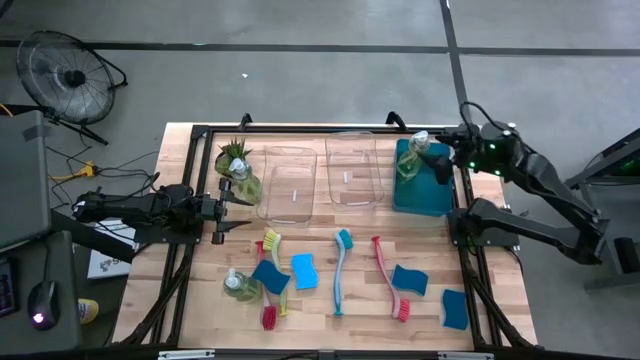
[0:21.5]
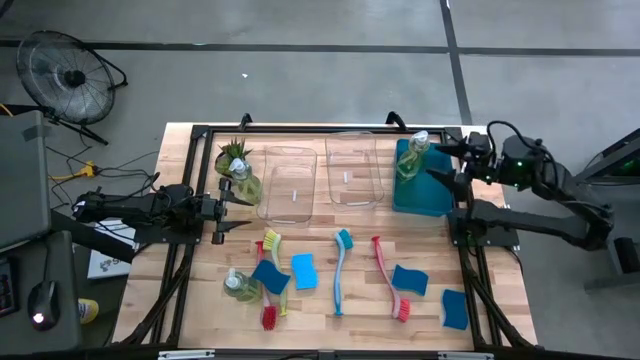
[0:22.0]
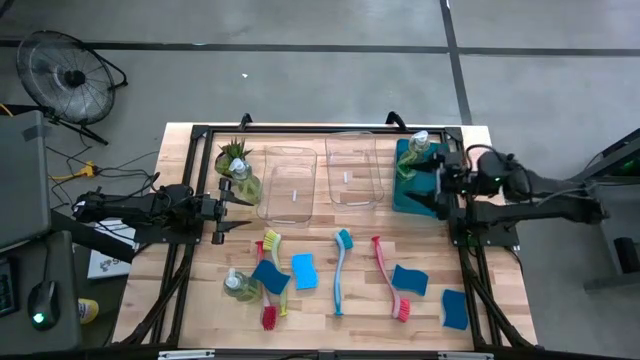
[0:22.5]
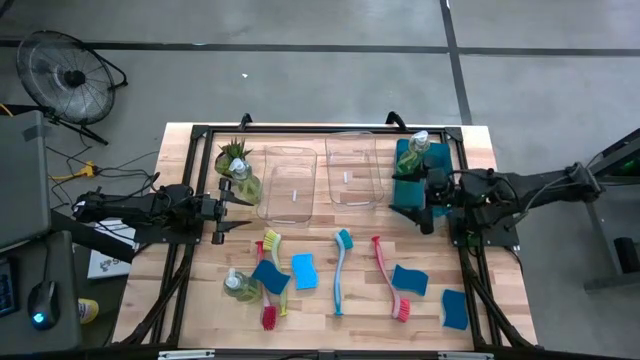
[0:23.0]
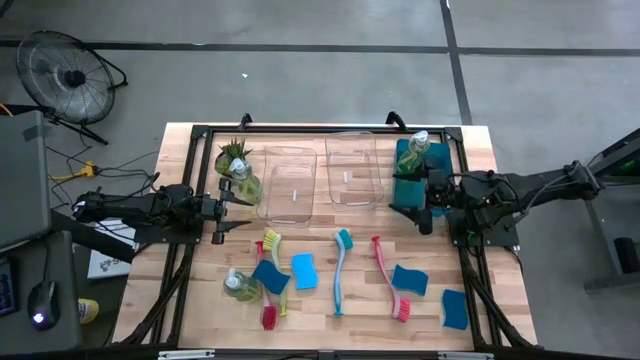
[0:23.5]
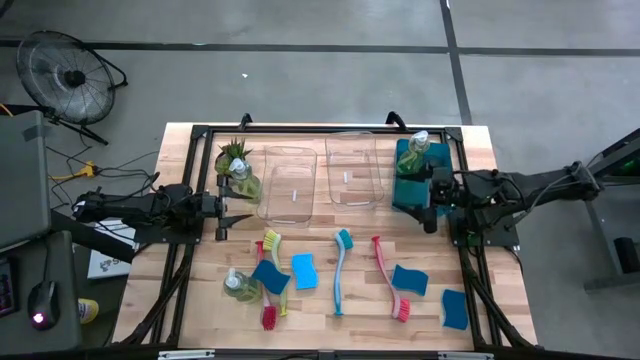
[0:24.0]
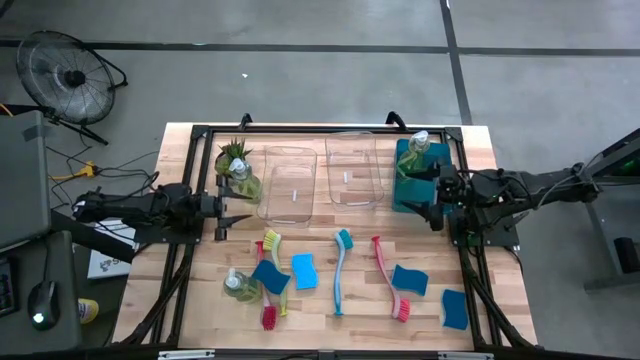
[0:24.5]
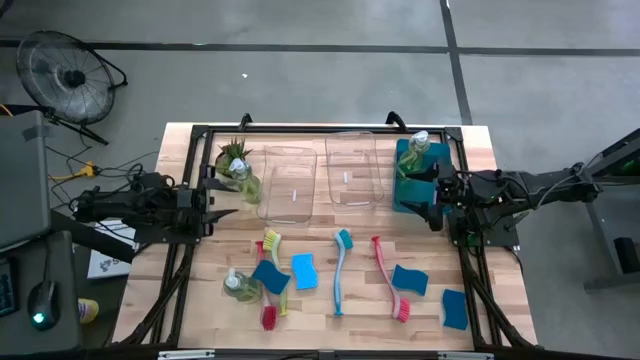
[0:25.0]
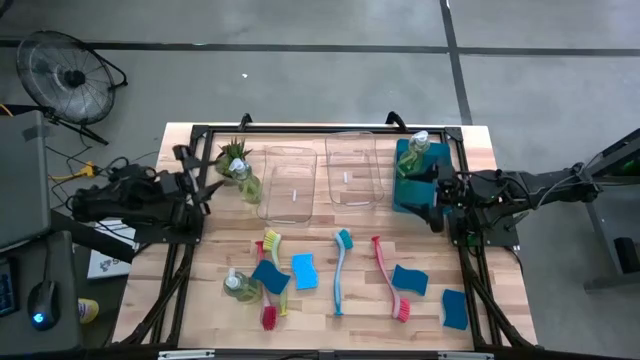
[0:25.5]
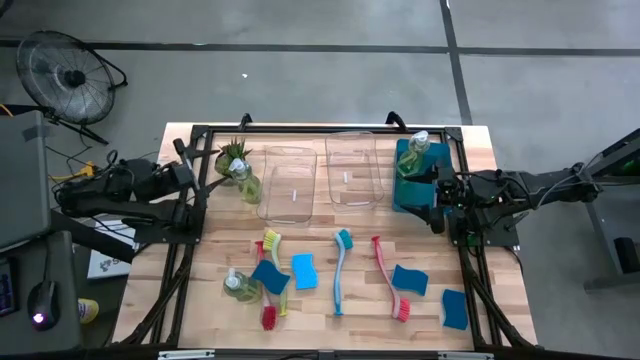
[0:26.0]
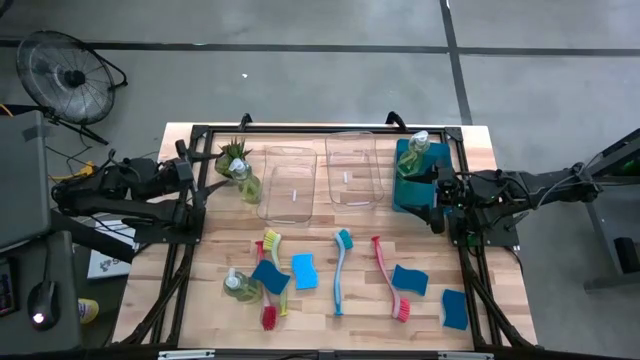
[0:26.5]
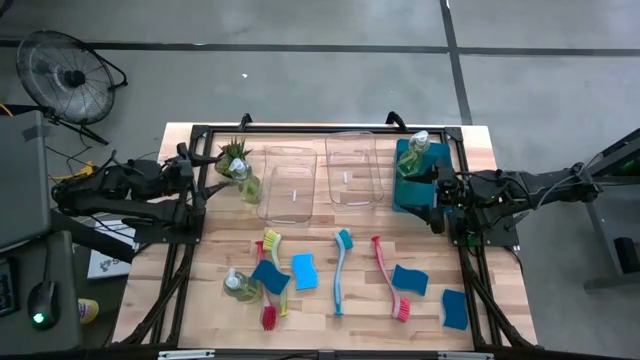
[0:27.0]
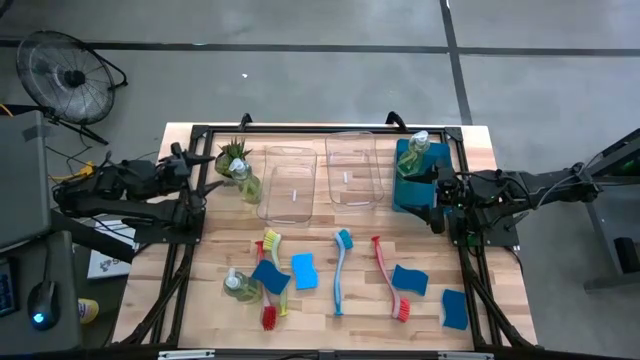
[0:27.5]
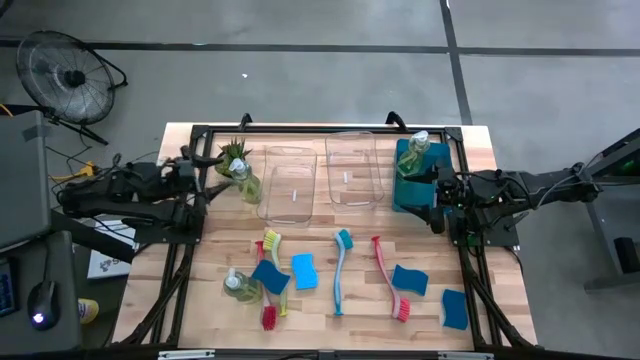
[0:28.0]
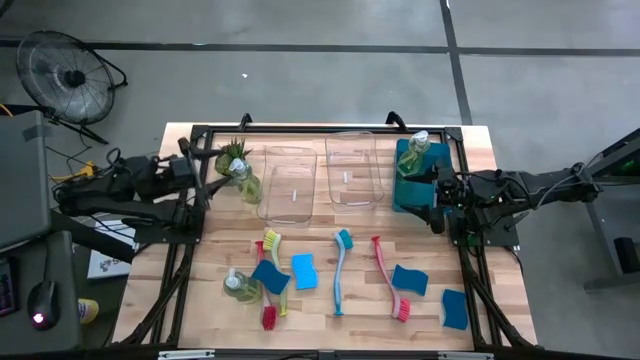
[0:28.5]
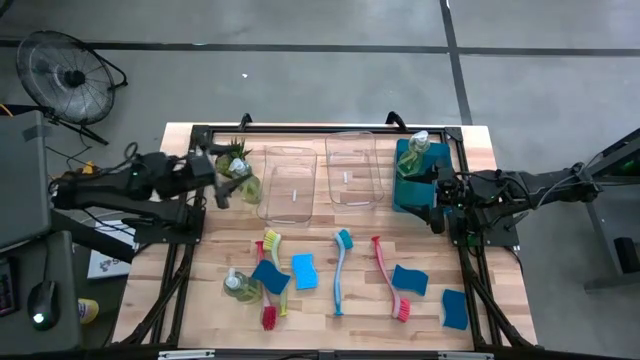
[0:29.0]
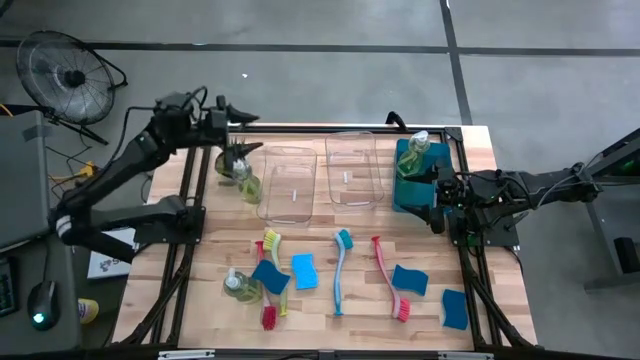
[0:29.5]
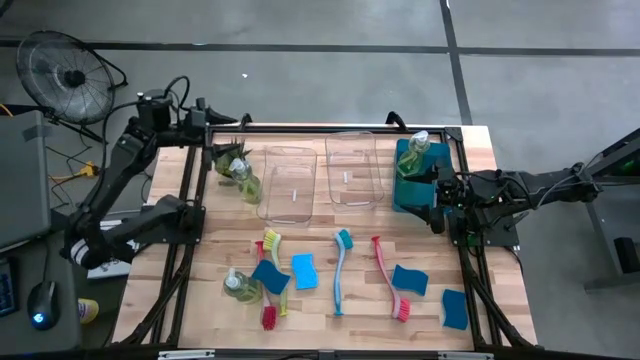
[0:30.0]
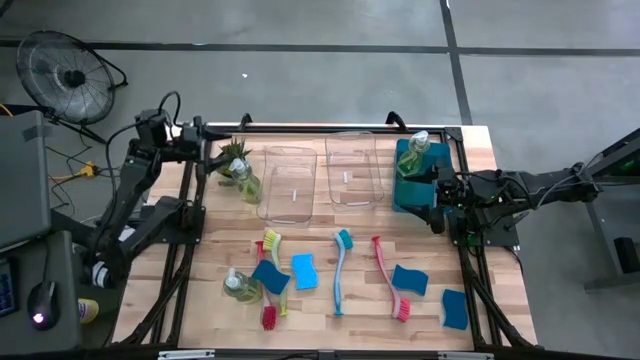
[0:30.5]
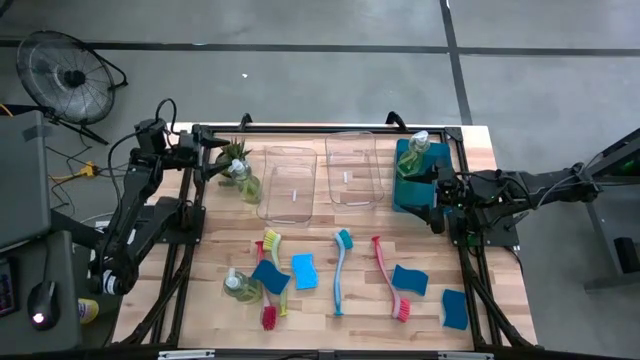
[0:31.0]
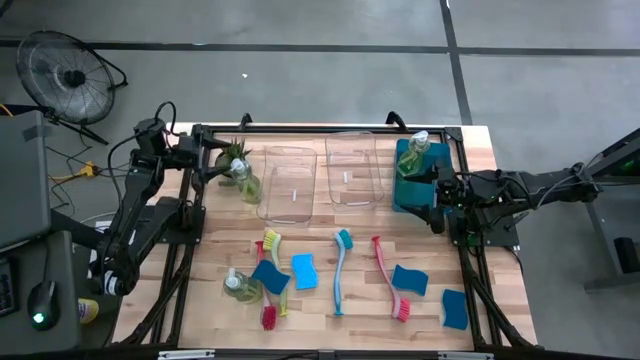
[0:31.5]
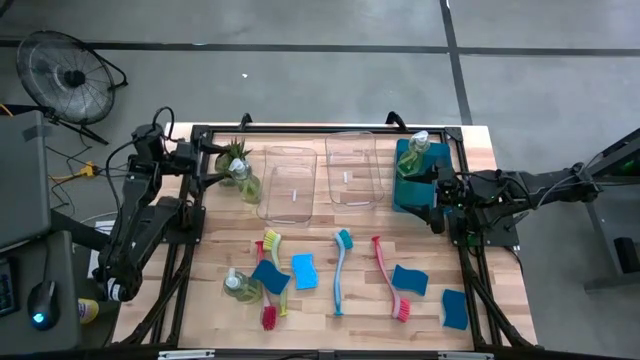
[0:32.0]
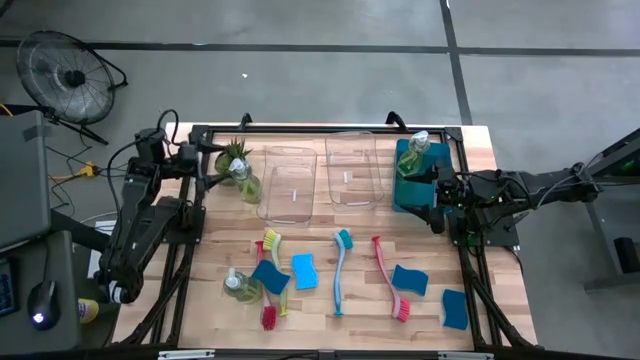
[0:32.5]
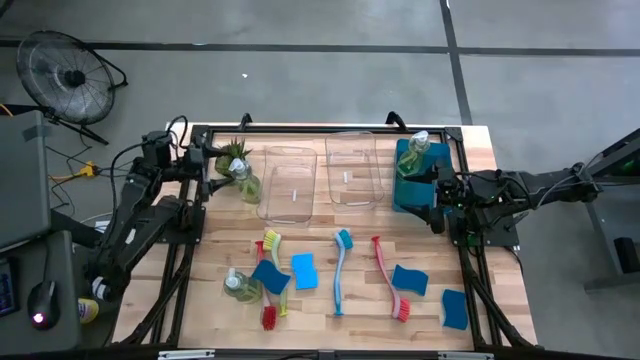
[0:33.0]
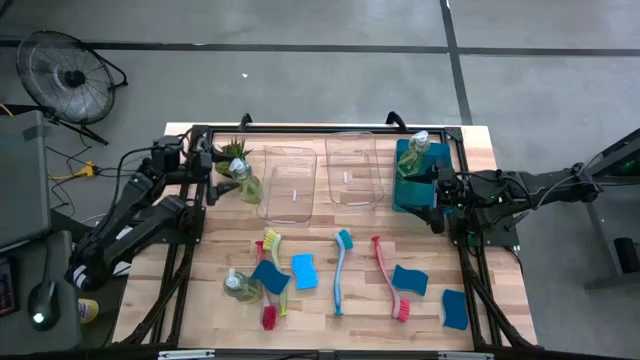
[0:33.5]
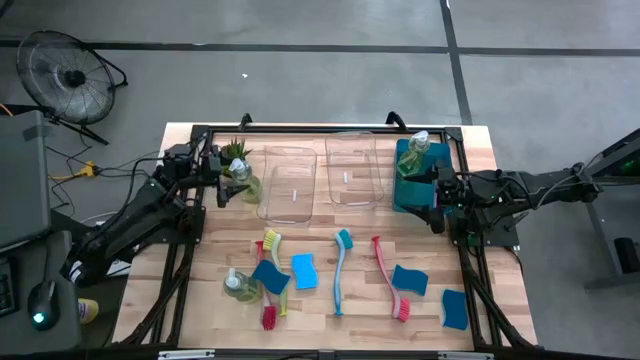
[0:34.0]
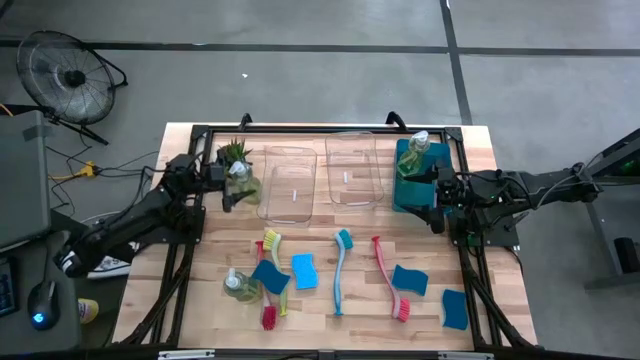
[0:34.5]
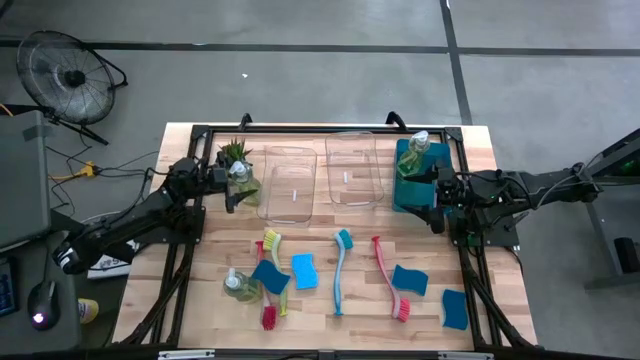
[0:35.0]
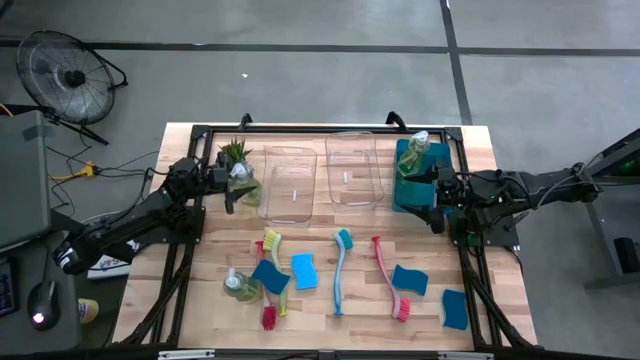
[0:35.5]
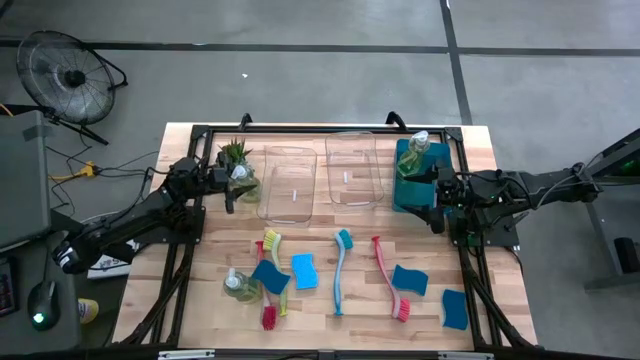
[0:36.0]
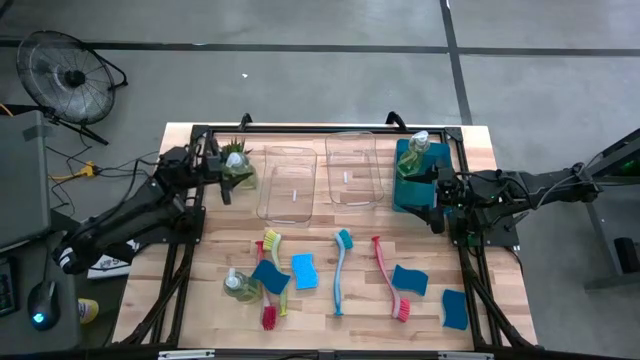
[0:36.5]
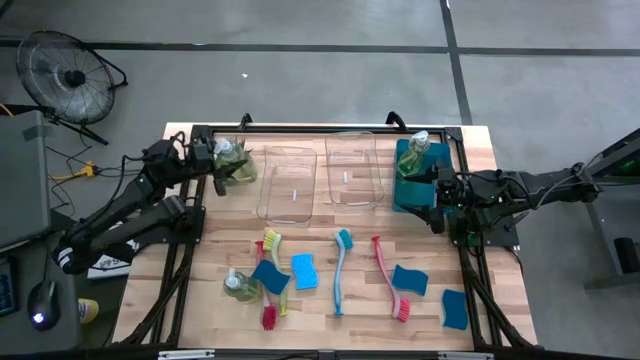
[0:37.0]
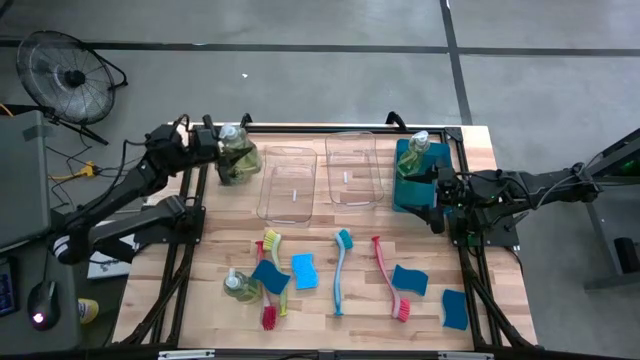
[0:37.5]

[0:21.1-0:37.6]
Task: Pick & Place Kitchen Sink Supplies
Put the top green dishwashing liquid dispenser into the blue bin

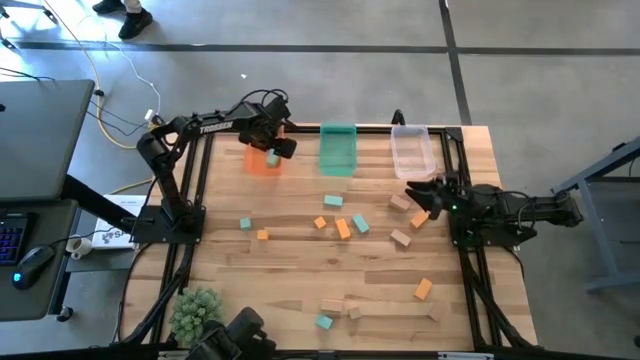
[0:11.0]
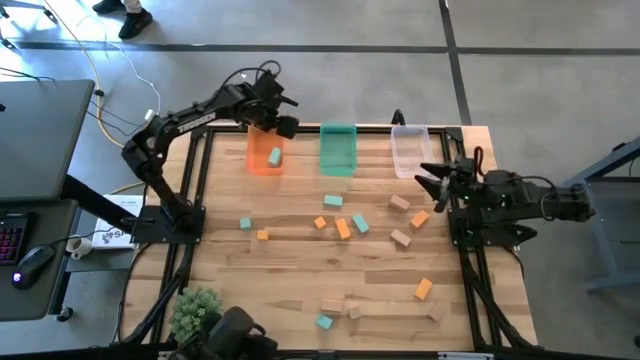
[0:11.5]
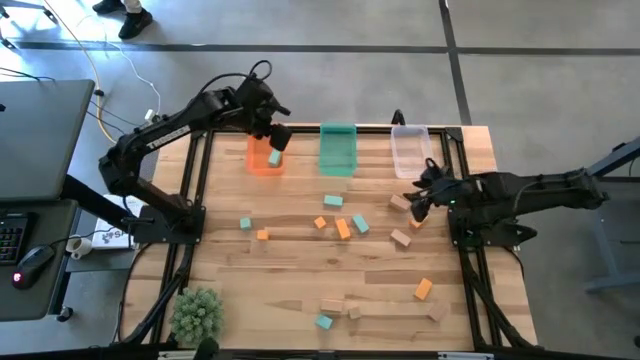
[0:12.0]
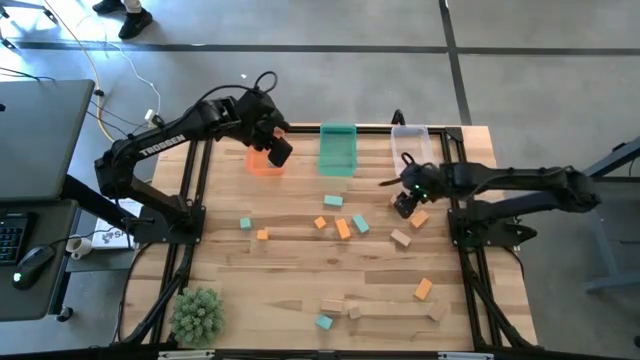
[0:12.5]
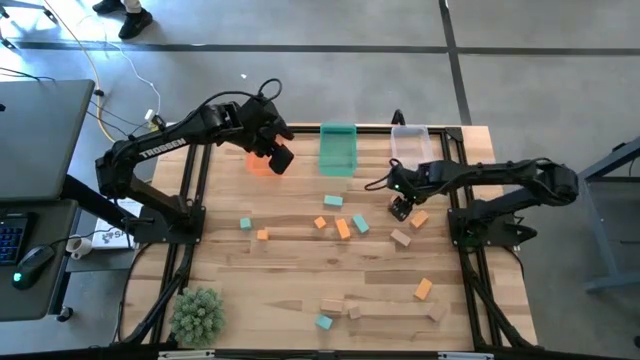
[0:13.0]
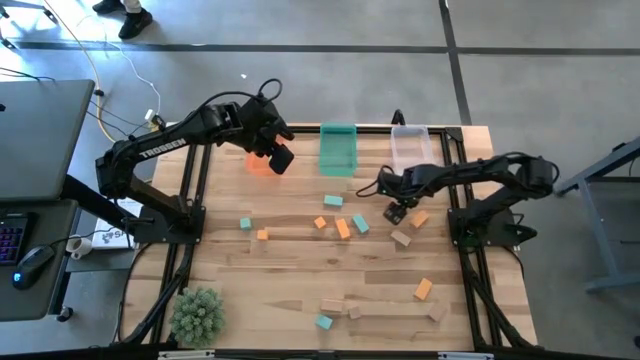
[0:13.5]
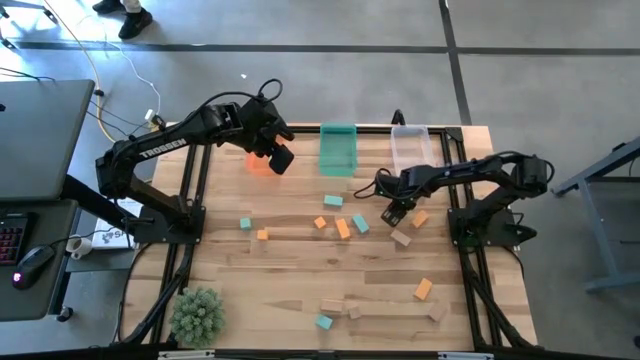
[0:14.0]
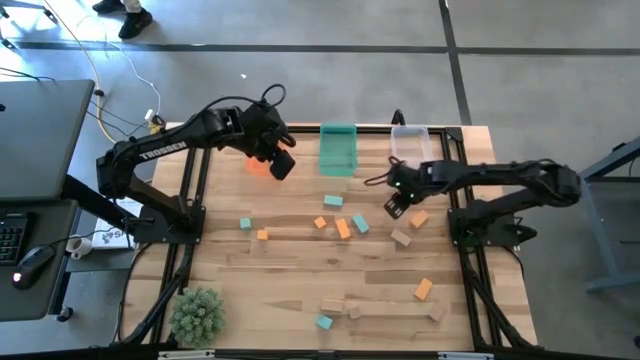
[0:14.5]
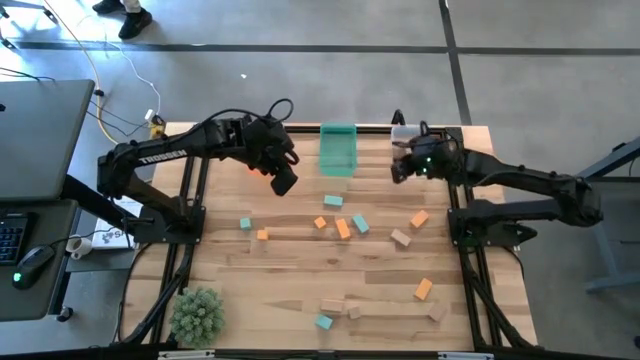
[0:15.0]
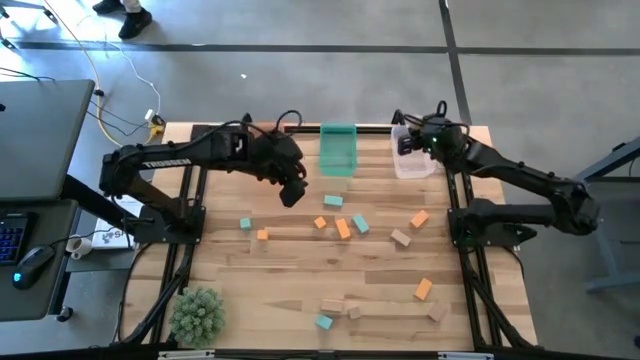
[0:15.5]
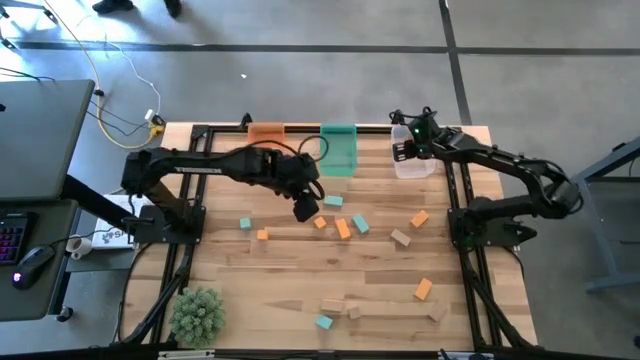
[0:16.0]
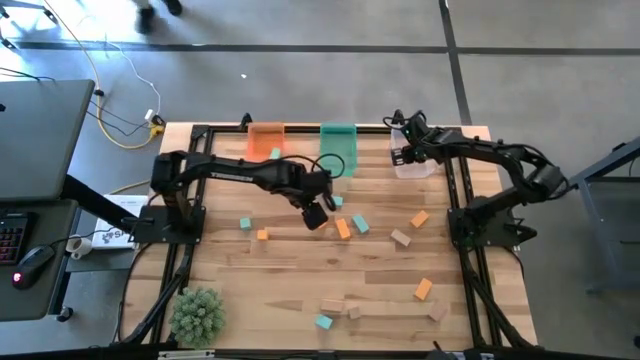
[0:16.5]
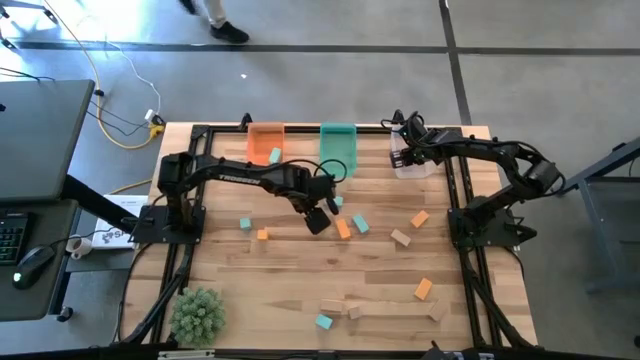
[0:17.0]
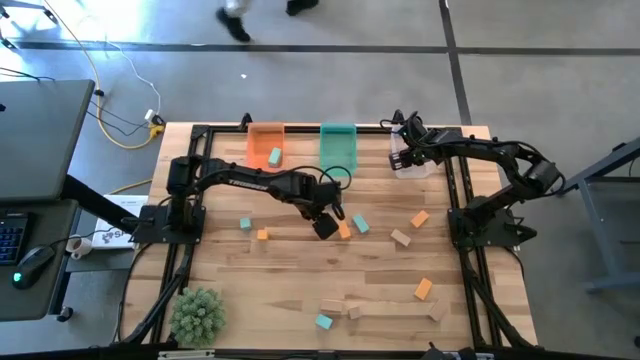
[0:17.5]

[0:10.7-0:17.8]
Task: Sort & place blocks by color
Put the brown block into the transparent bin
